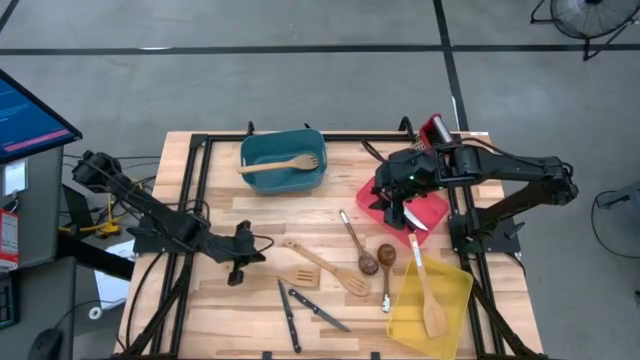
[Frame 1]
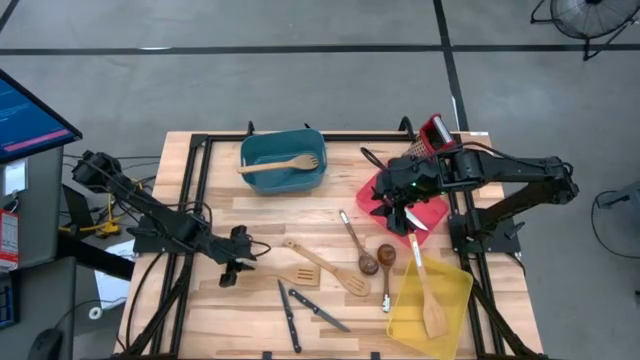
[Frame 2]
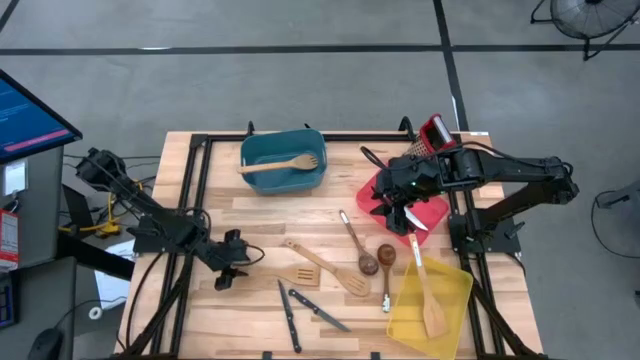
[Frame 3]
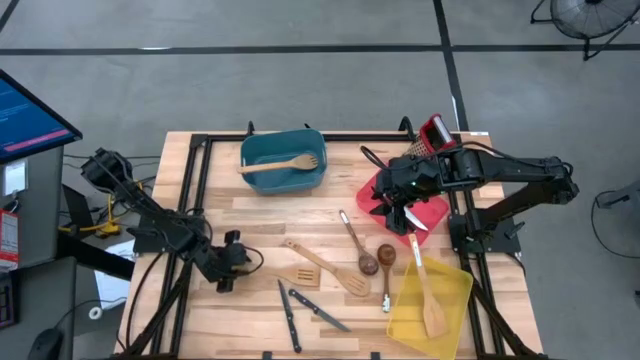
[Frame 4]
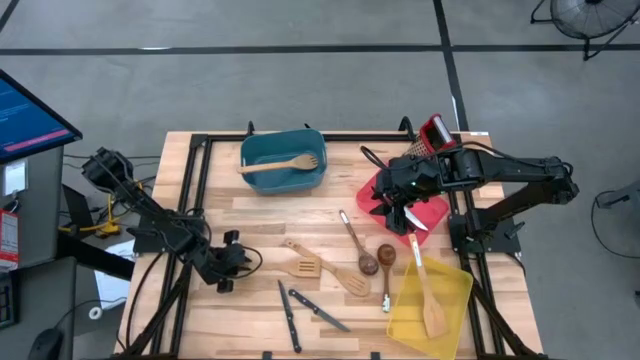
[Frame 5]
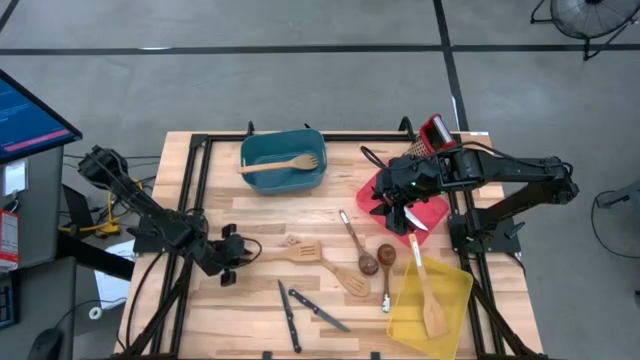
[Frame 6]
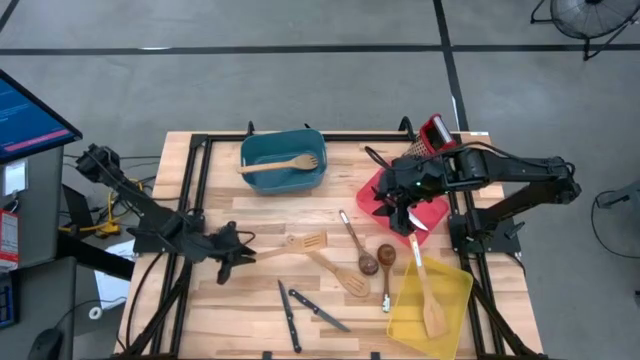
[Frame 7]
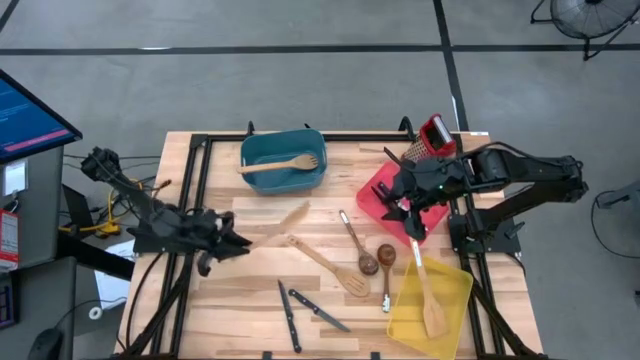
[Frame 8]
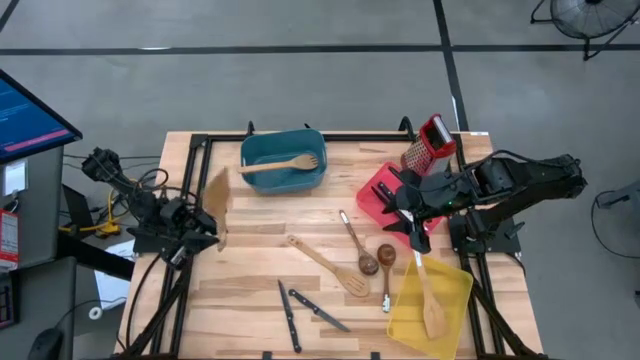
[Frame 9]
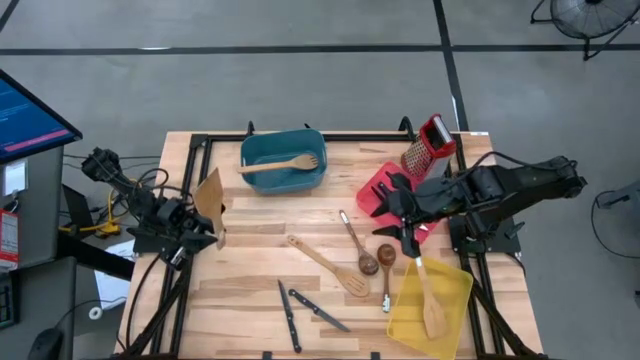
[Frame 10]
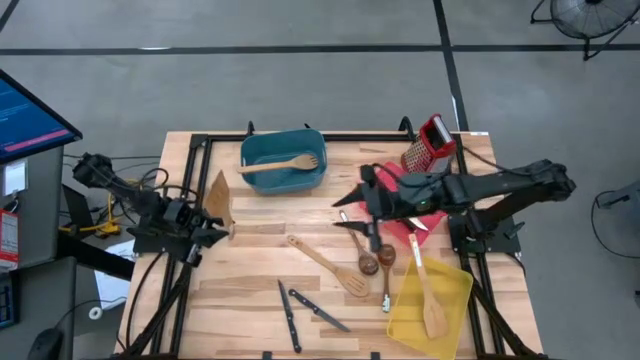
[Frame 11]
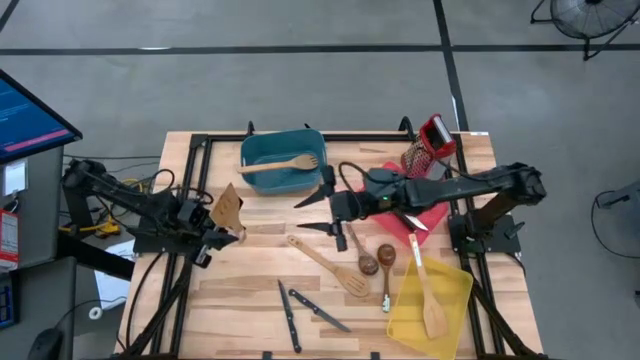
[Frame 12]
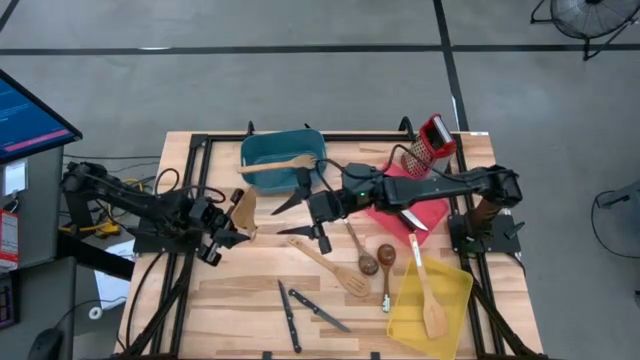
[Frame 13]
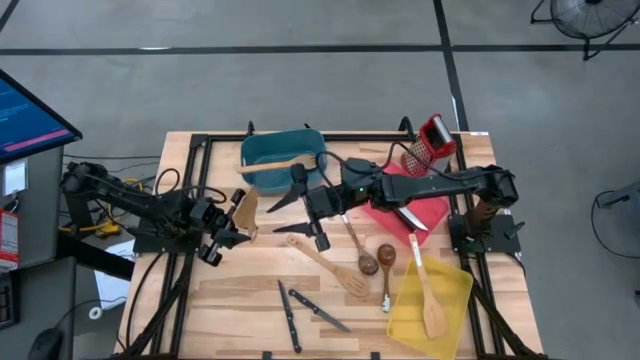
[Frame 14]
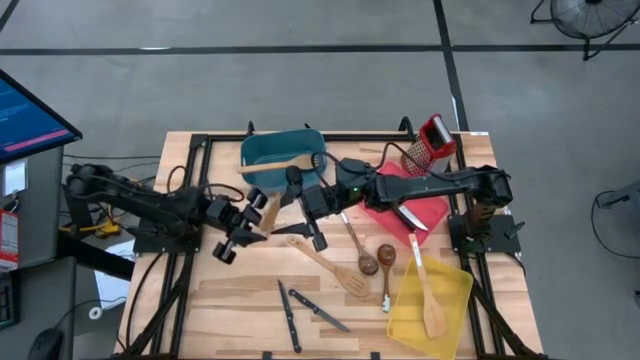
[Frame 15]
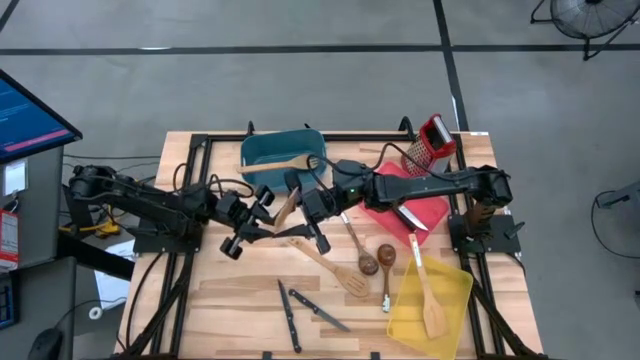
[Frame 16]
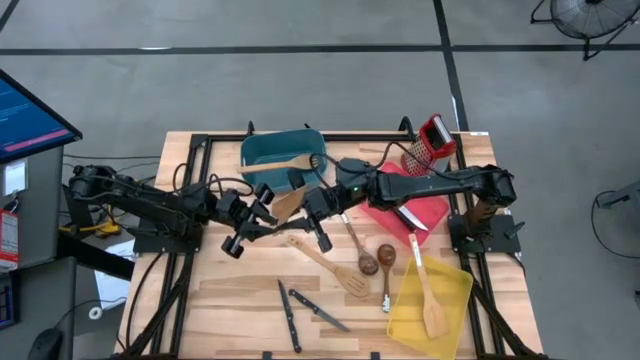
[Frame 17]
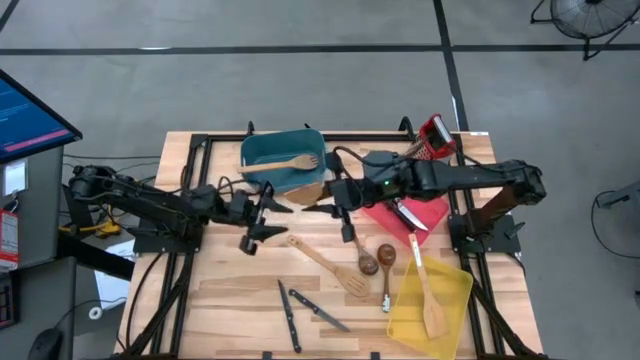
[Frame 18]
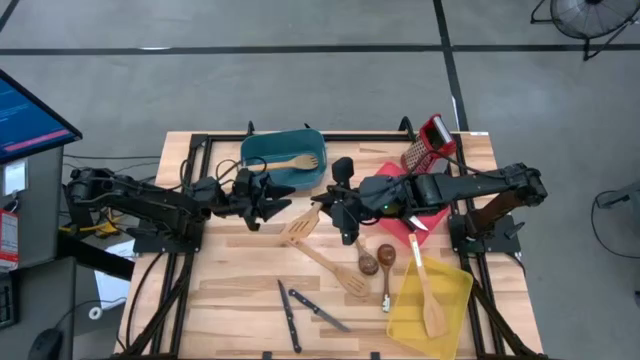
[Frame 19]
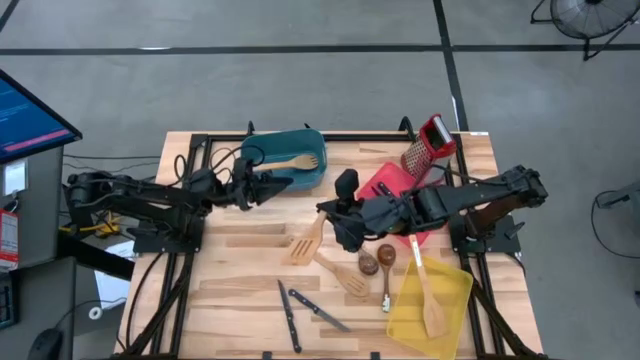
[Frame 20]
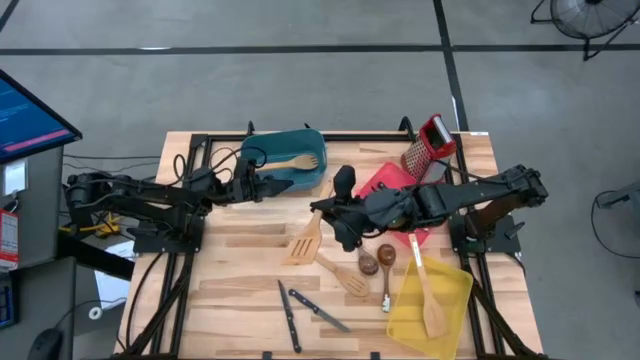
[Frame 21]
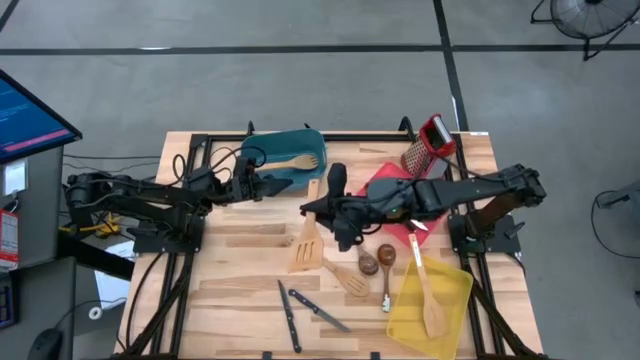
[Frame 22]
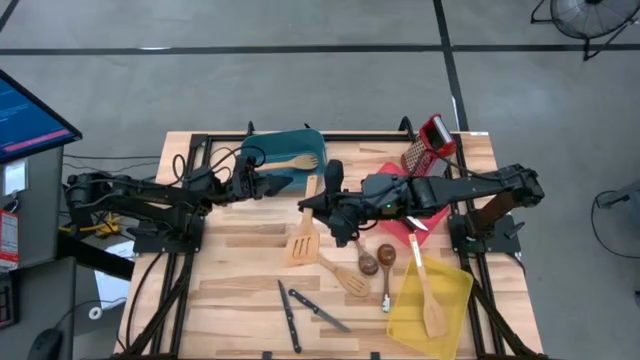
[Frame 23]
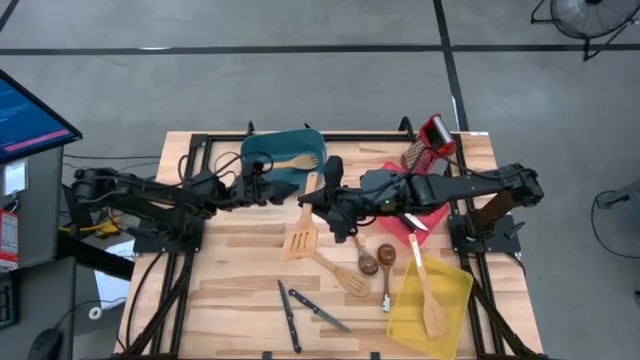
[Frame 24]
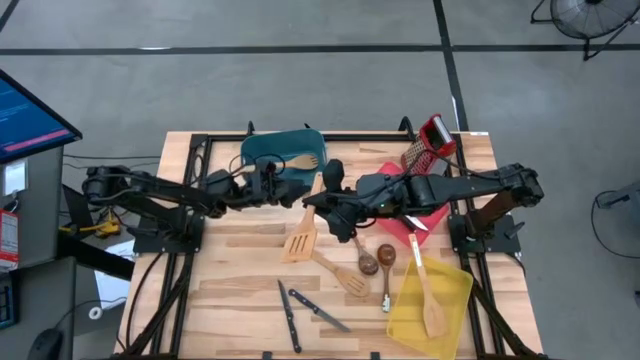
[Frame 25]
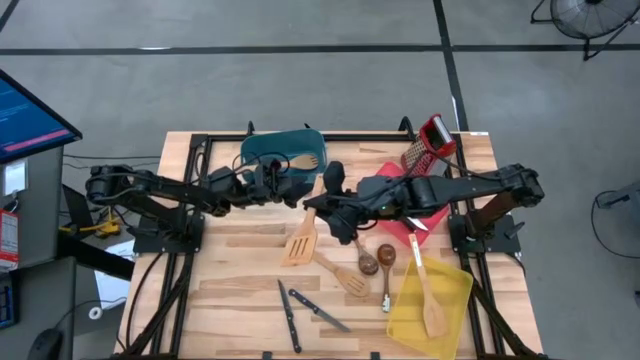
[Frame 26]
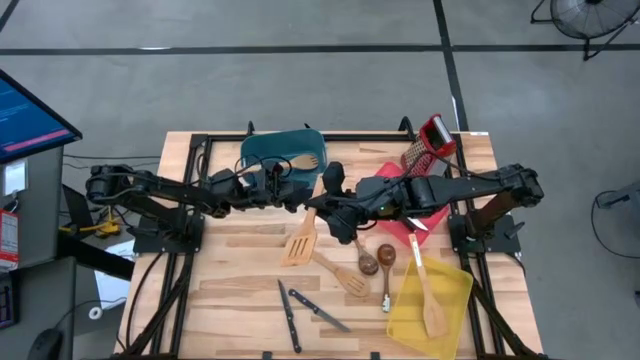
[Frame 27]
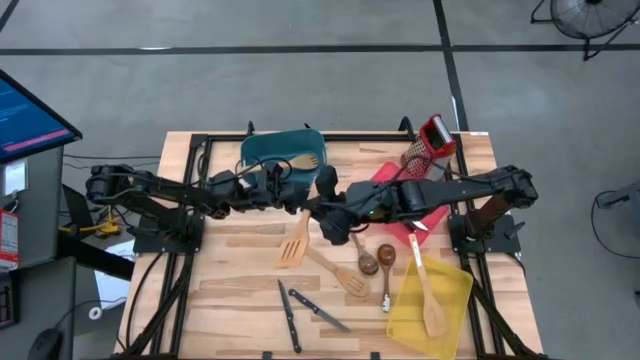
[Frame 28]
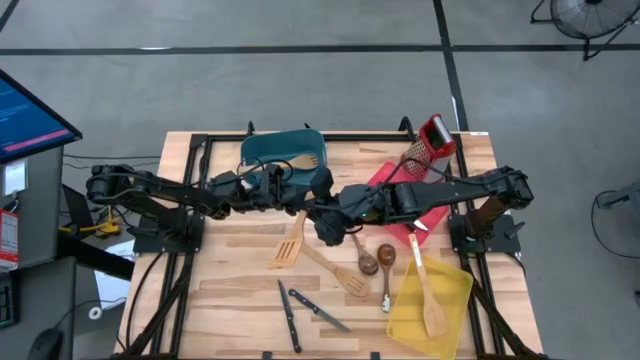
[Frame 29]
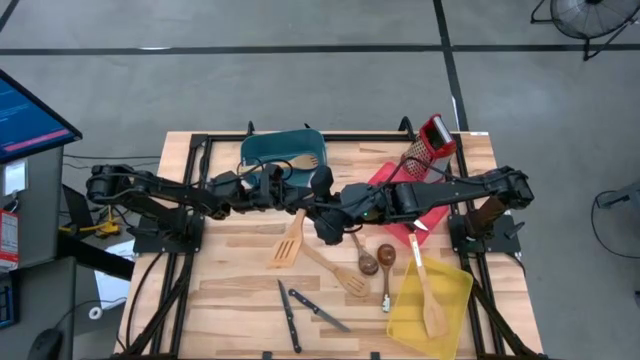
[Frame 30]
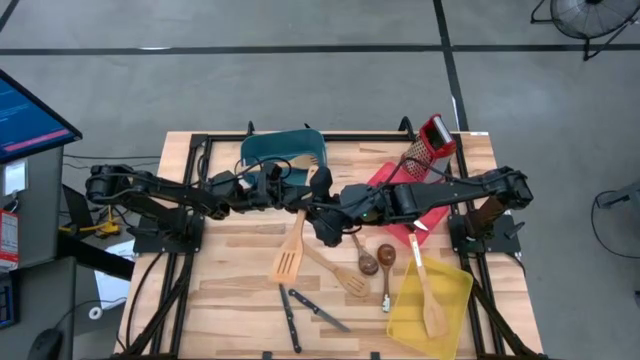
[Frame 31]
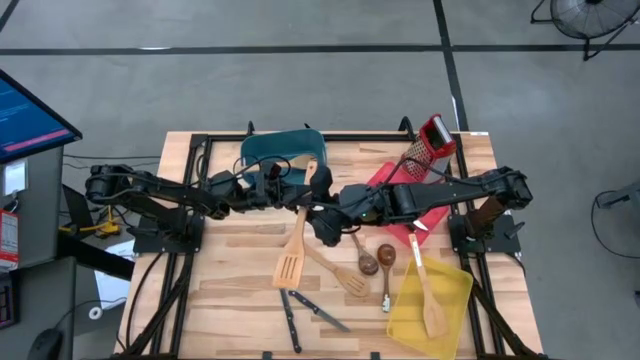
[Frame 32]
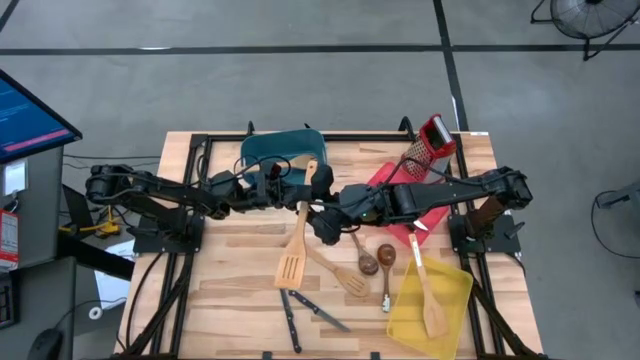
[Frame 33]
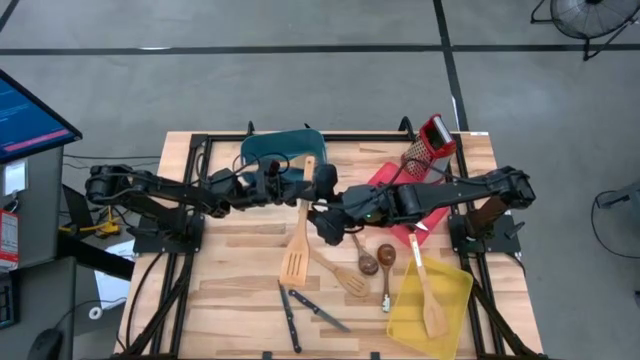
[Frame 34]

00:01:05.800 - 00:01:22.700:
Task: Pick & Place Kitchen Items
Put the wooden slotted spatula into the yellow bin

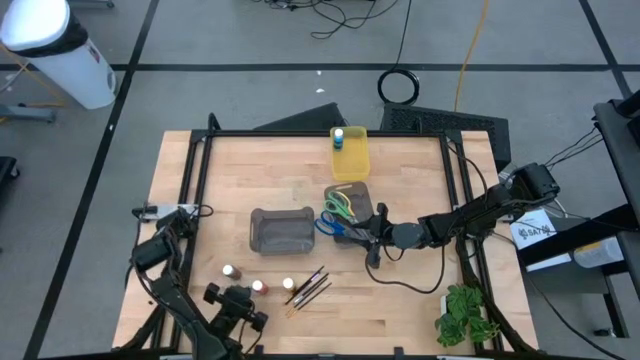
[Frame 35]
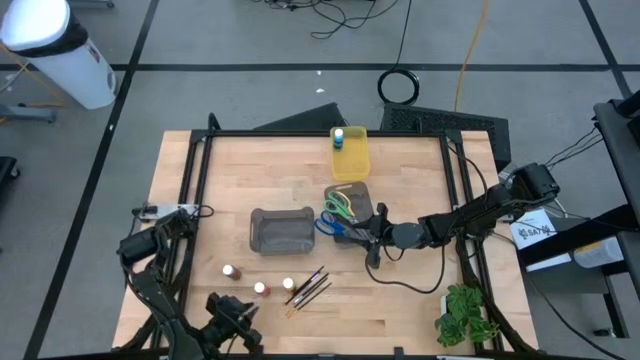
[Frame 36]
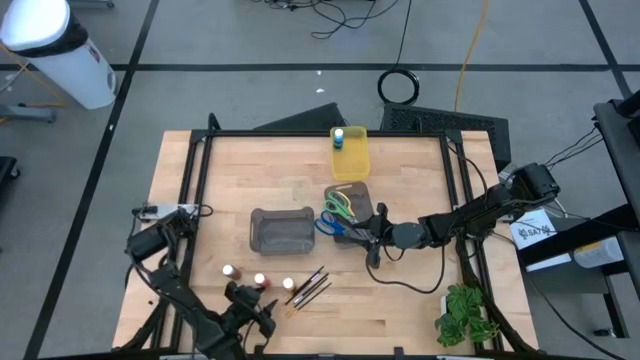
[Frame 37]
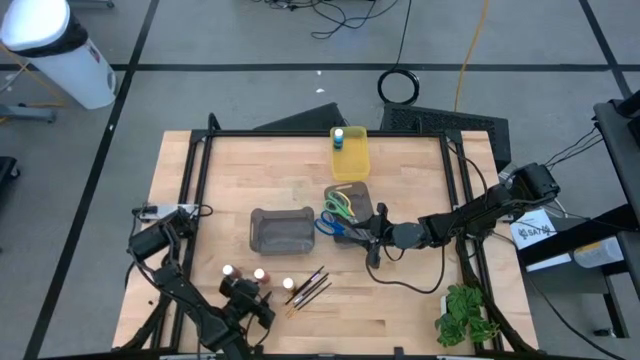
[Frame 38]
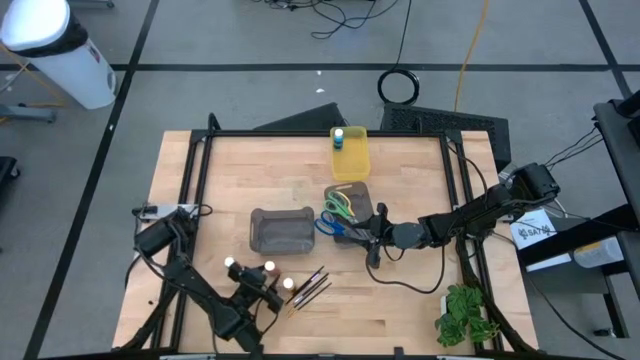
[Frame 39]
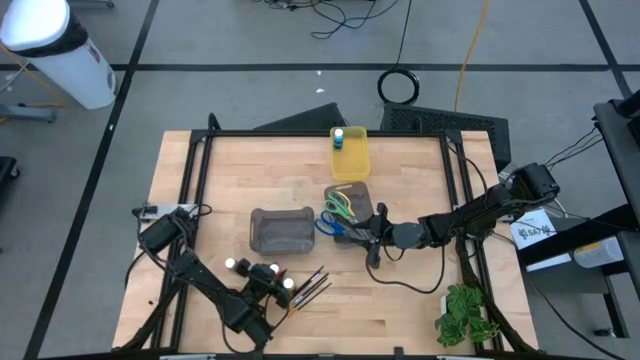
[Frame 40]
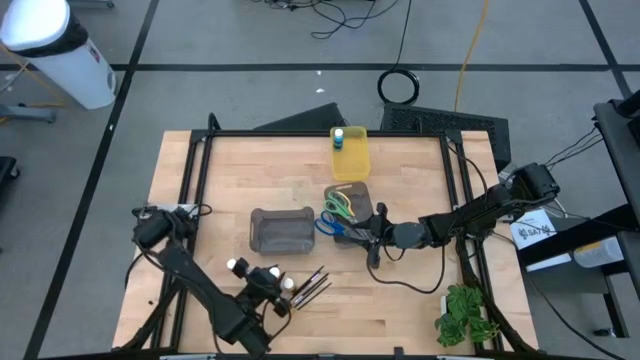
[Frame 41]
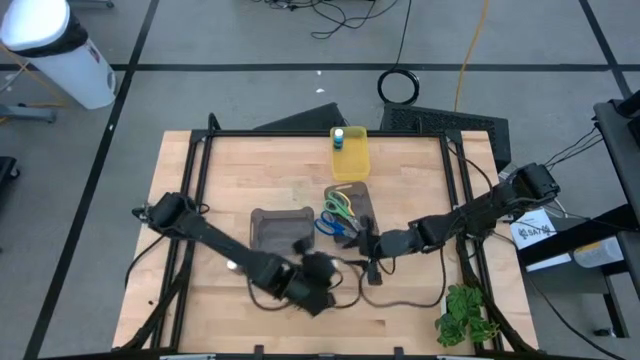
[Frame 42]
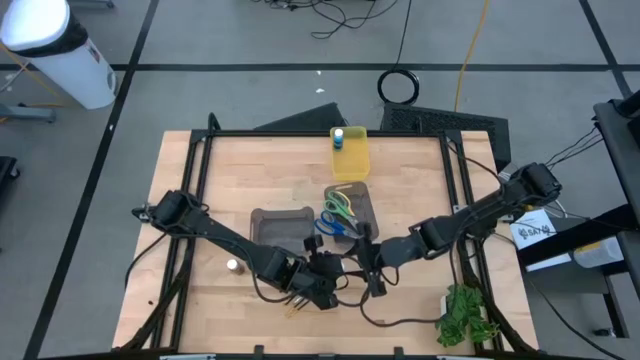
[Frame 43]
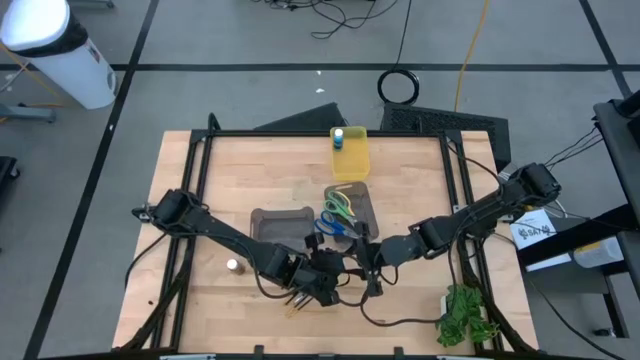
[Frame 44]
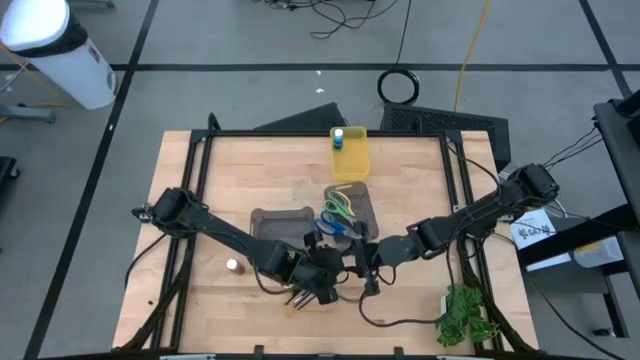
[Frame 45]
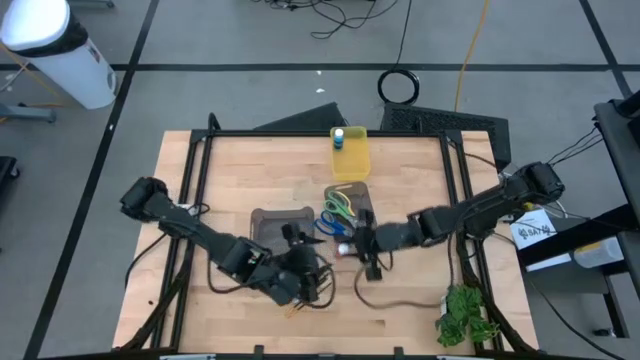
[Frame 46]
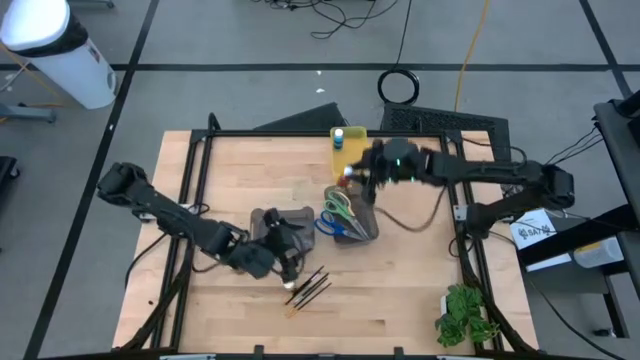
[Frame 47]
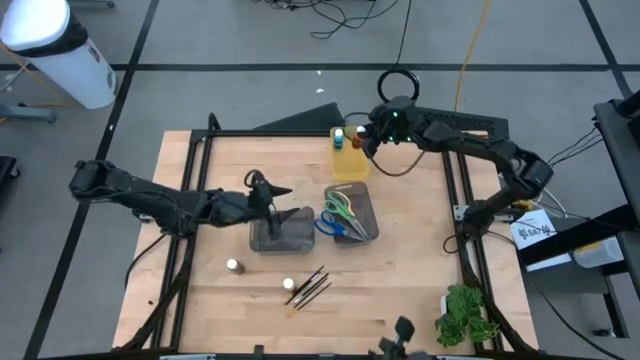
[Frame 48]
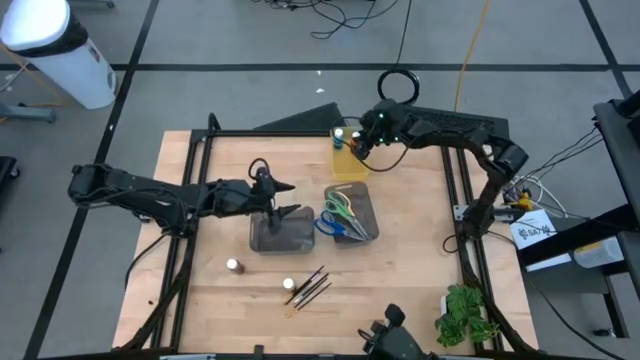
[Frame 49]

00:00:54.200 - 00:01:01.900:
Task: Pick & Place Paint Supplies
Put the orange paint bottle into the yellow bin
